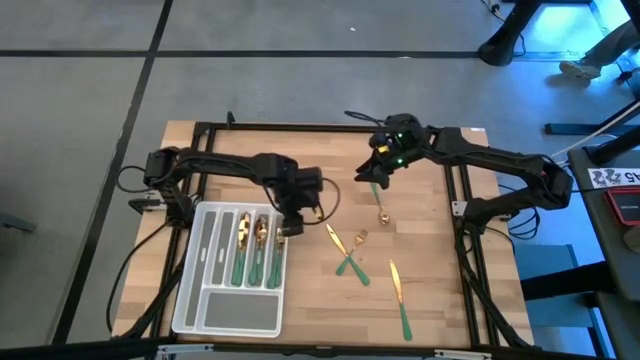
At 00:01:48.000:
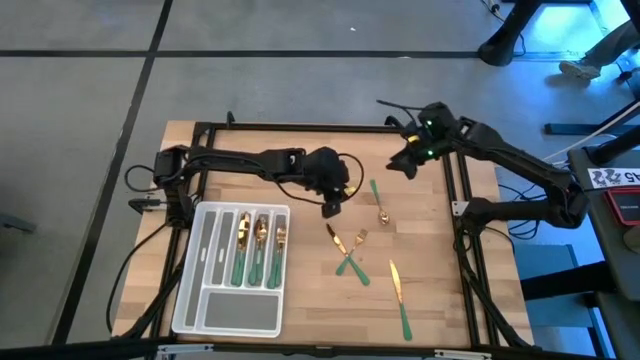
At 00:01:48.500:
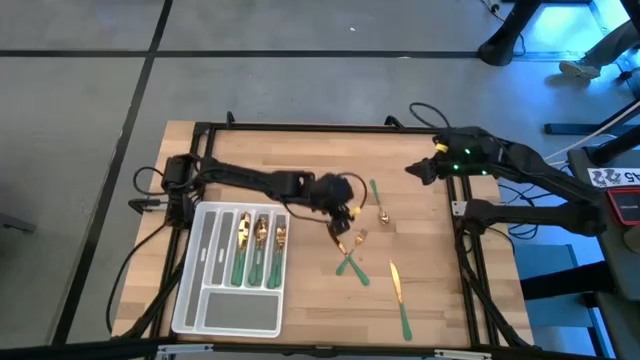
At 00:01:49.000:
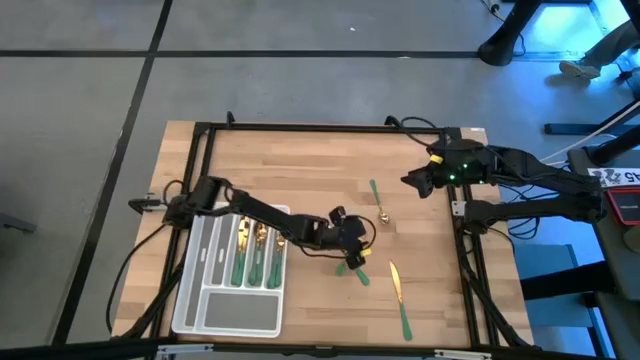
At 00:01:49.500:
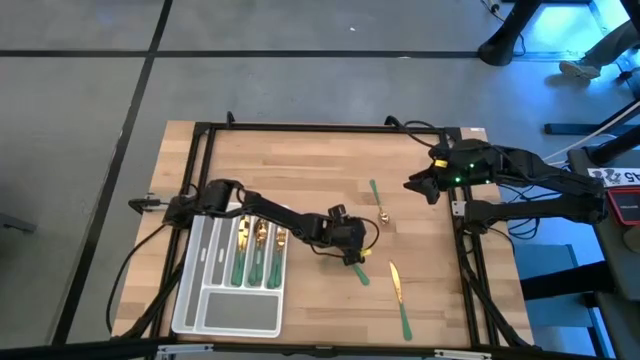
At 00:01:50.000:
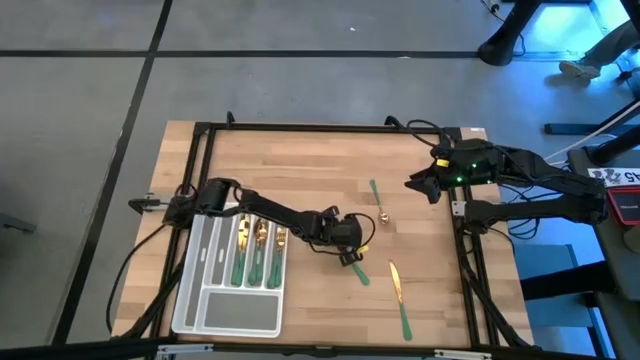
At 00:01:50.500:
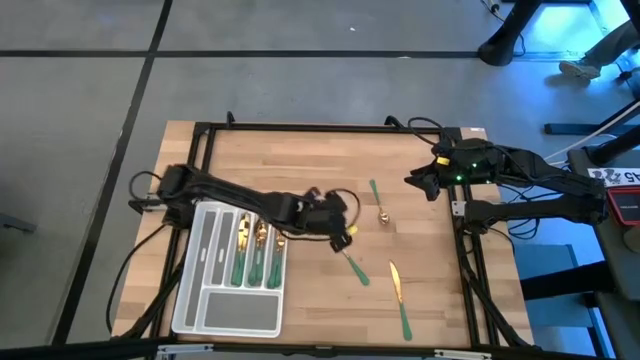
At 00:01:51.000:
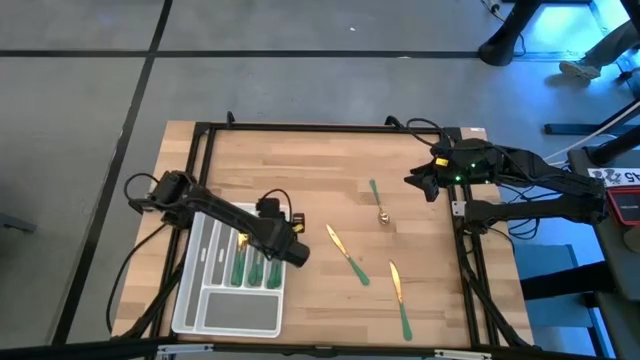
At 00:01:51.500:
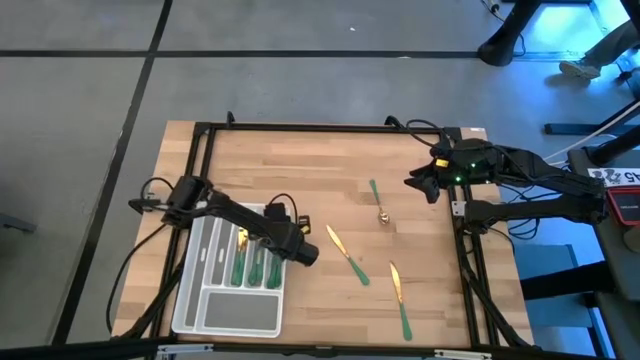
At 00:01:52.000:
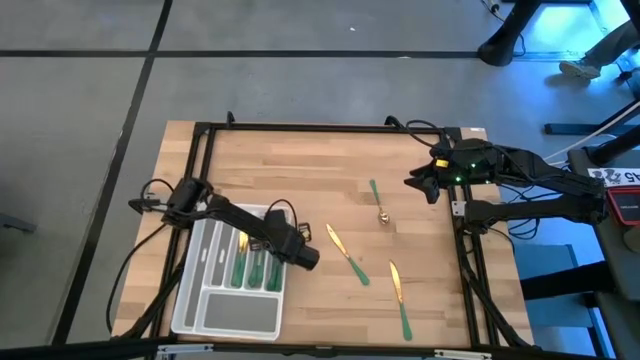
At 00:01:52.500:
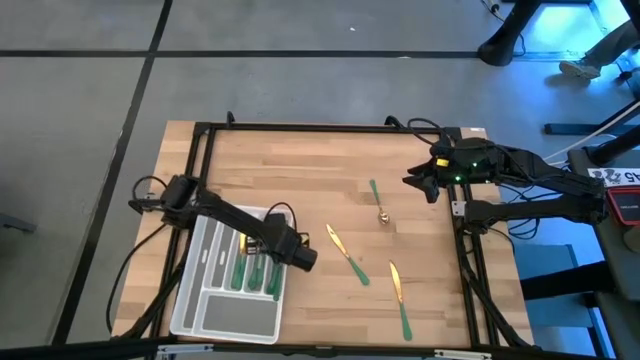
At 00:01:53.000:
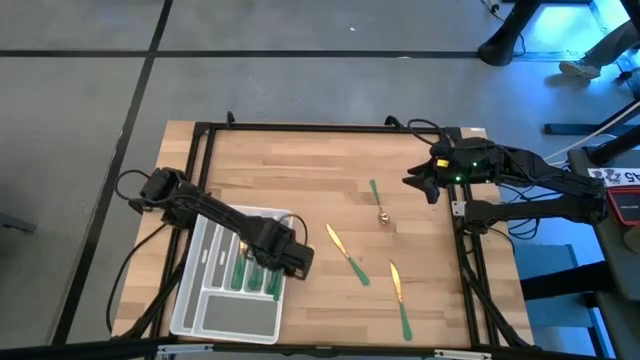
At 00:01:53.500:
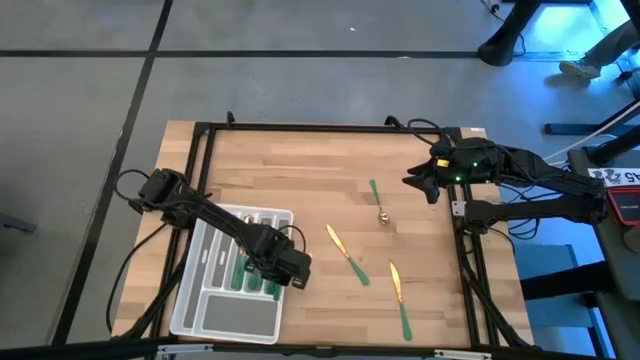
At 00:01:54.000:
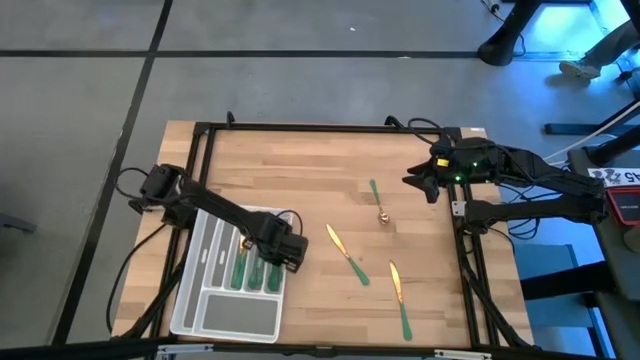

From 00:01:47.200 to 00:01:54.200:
Task: Sort silverware
Put the fork into the silverware tray

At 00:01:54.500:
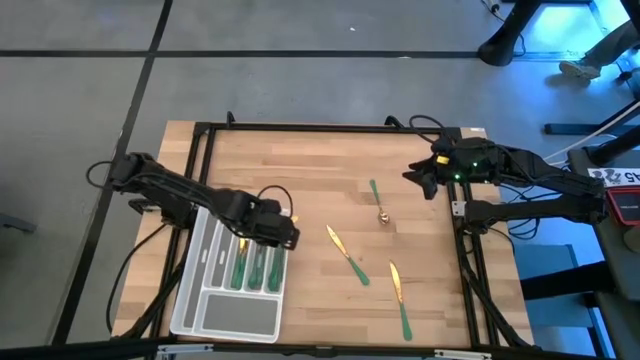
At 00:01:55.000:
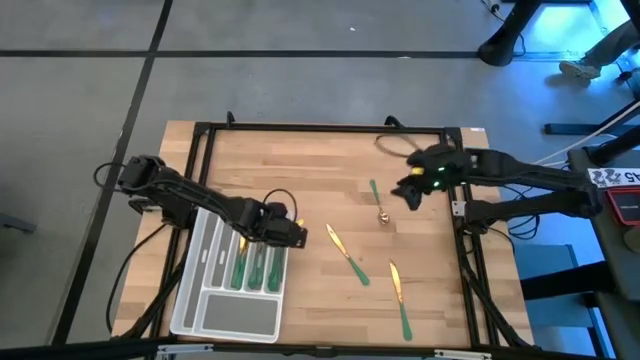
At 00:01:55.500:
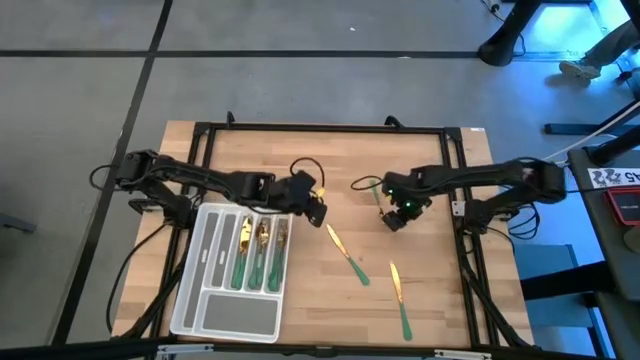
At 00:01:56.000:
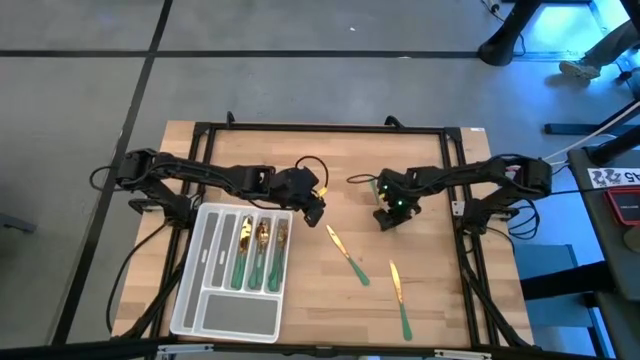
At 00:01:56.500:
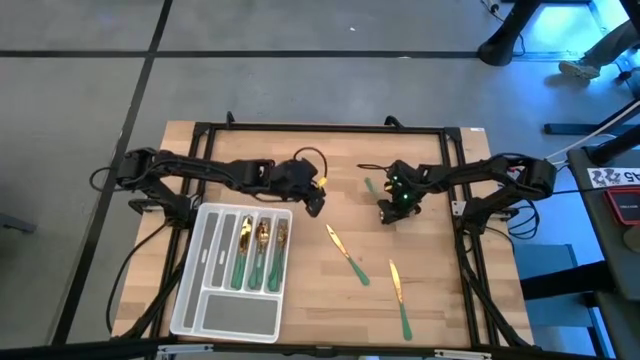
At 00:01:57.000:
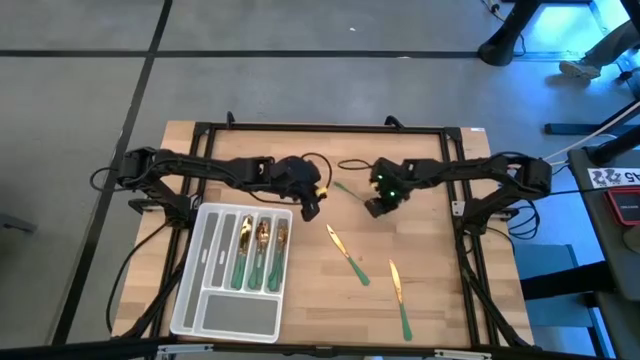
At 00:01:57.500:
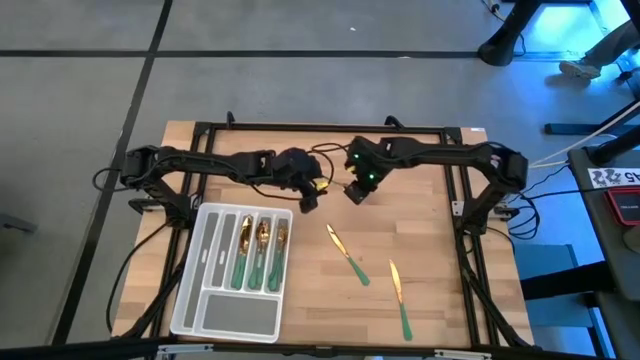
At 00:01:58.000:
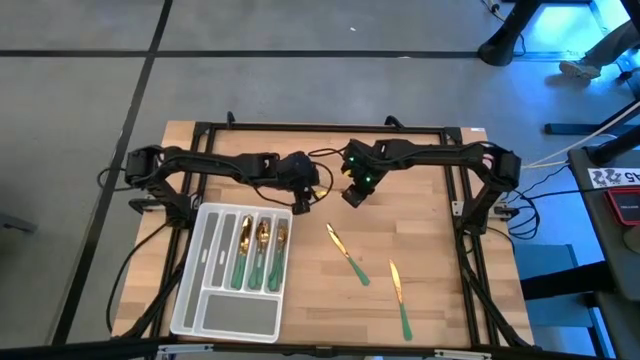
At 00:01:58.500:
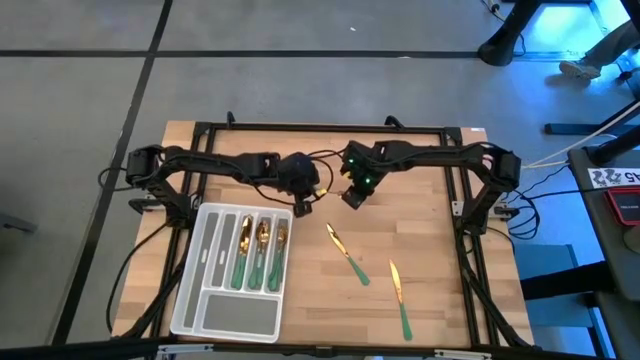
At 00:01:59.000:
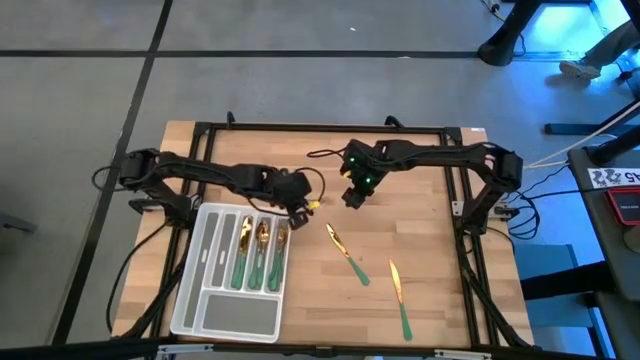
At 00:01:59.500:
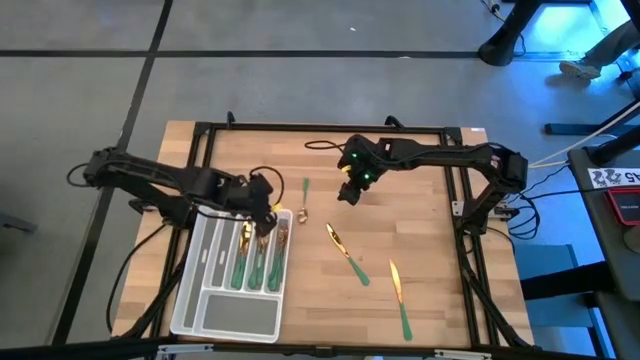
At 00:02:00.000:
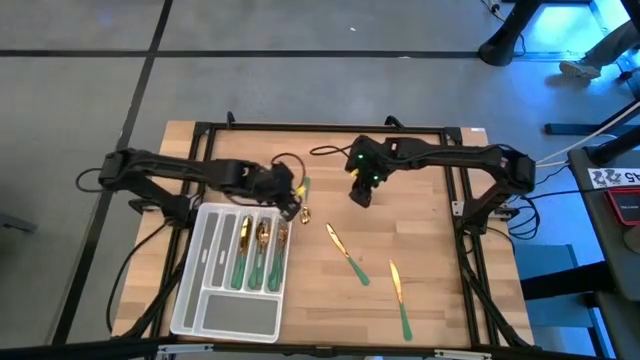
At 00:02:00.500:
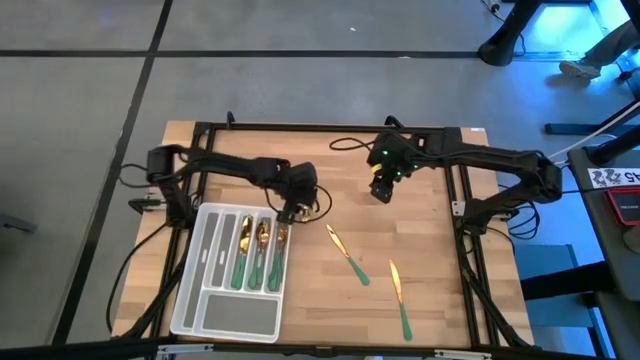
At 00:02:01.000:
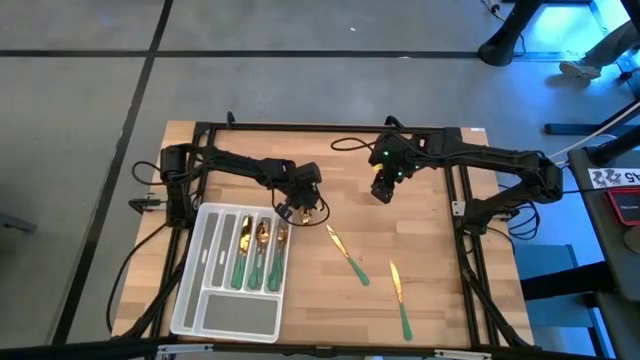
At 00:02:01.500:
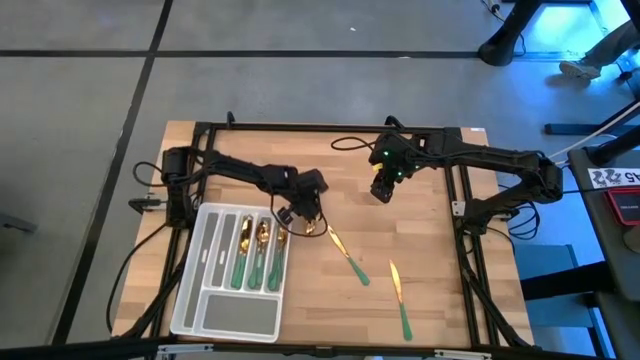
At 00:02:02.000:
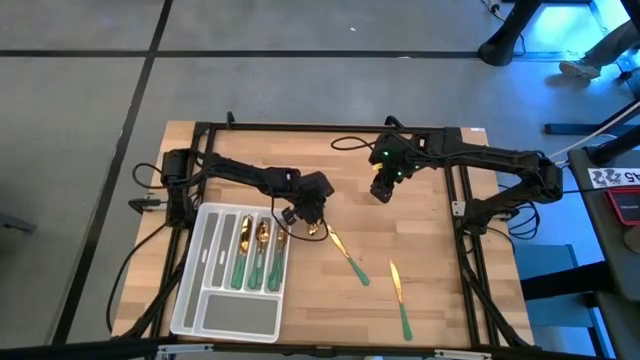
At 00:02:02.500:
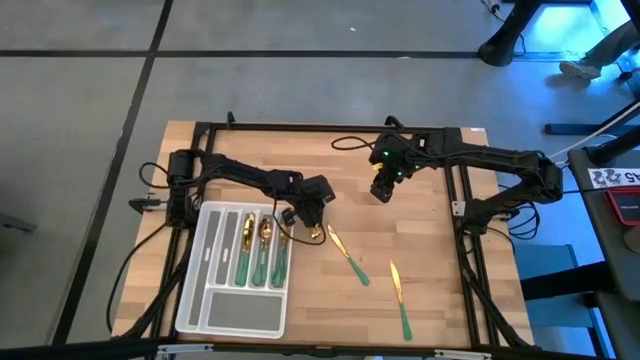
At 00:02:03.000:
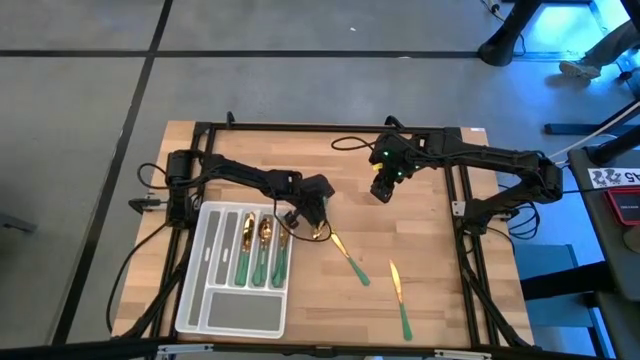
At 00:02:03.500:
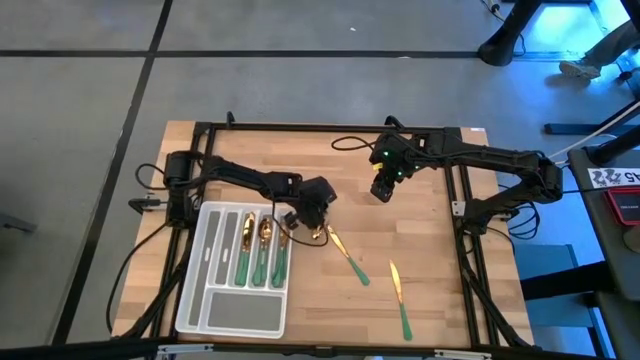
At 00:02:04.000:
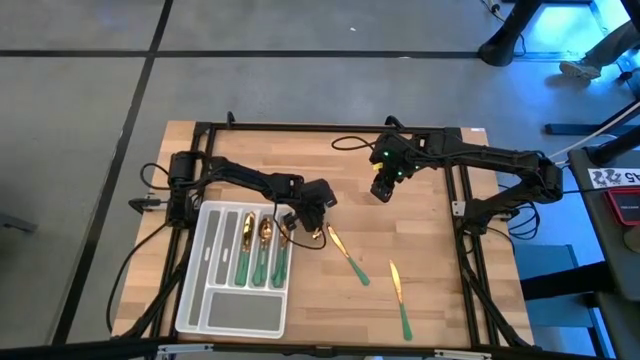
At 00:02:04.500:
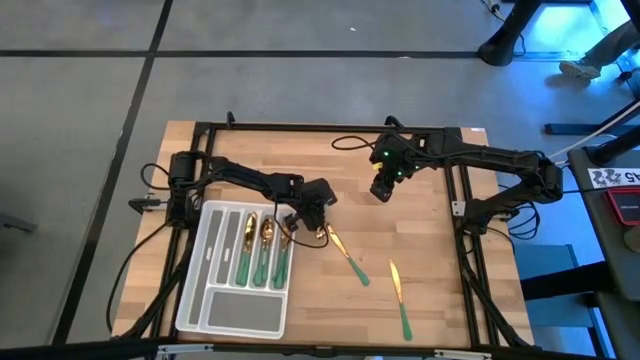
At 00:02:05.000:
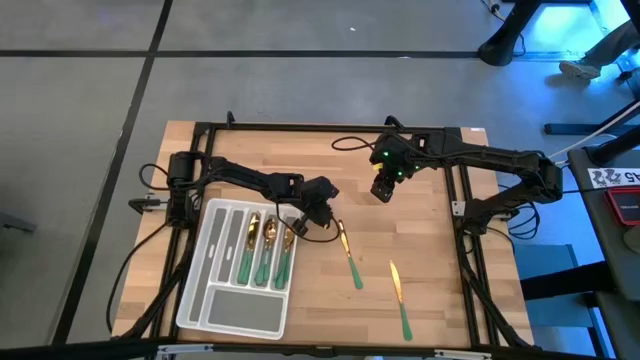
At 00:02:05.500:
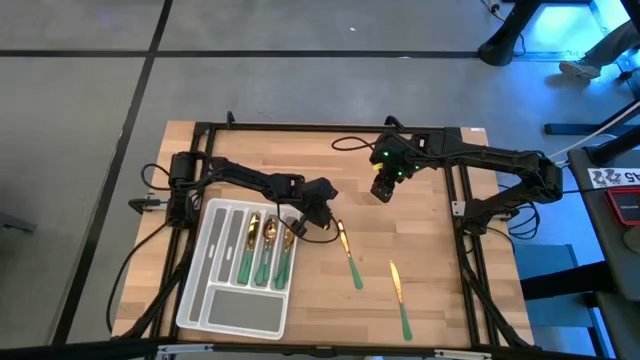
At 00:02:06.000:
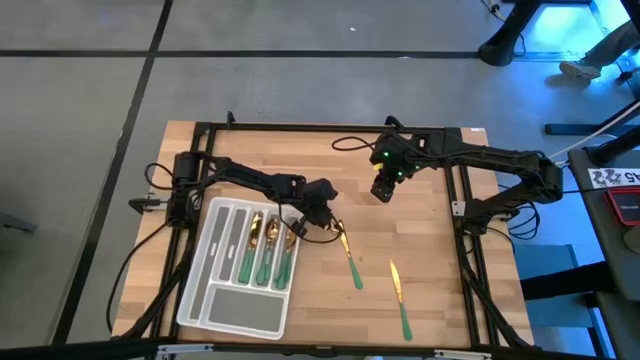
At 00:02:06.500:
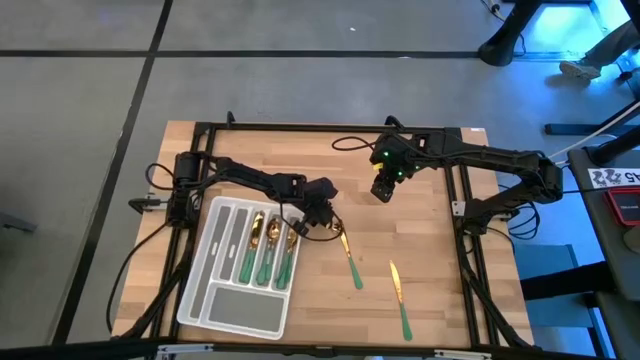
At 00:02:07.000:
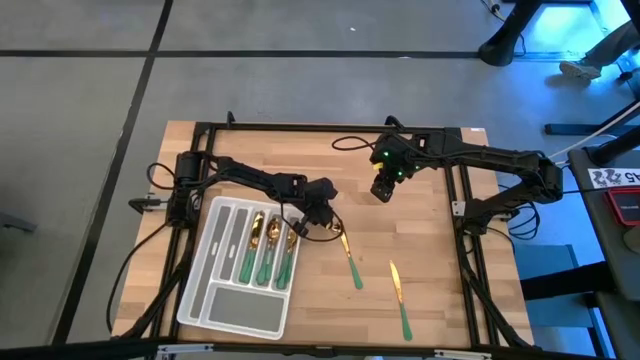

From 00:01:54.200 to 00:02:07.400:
Put the spoon into the silverware tray

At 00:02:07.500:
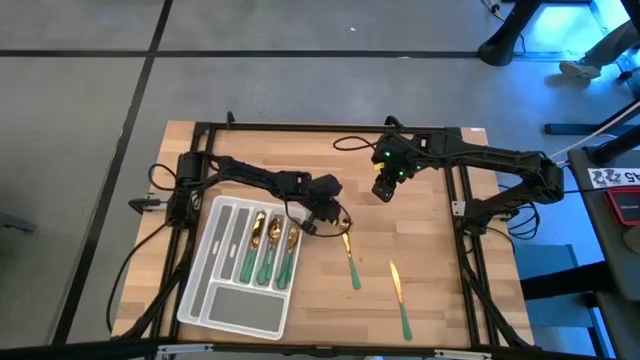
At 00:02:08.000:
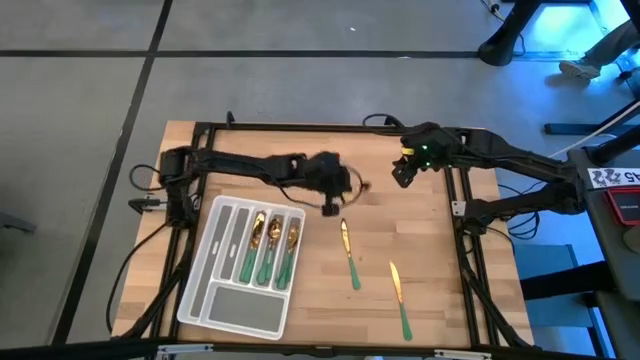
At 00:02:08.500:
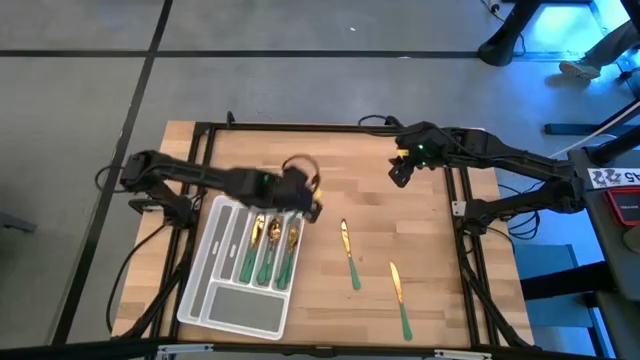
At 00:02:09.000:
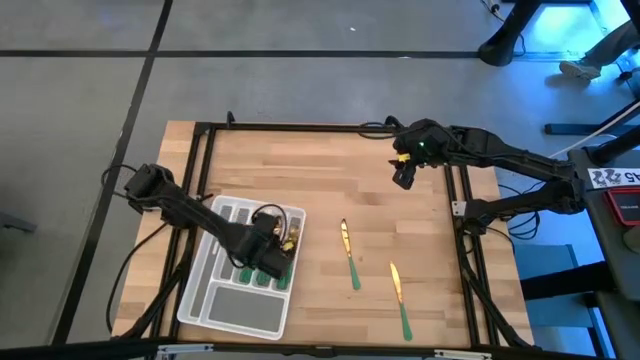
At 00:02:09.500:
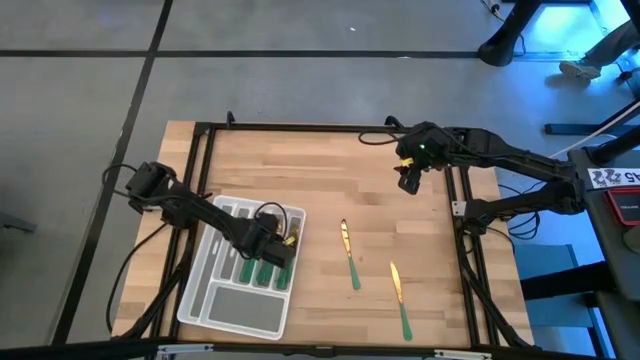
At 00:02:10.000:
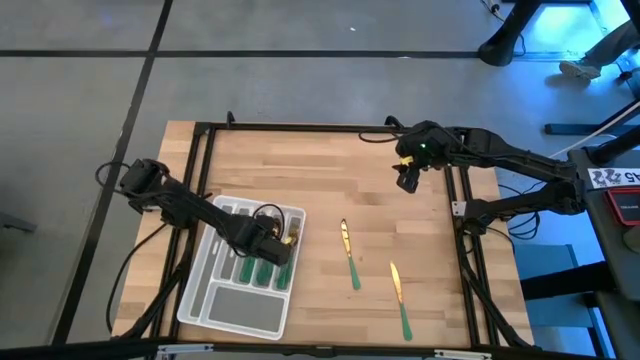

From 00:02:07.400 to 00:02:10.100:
Put the spoon into the silverware tray
